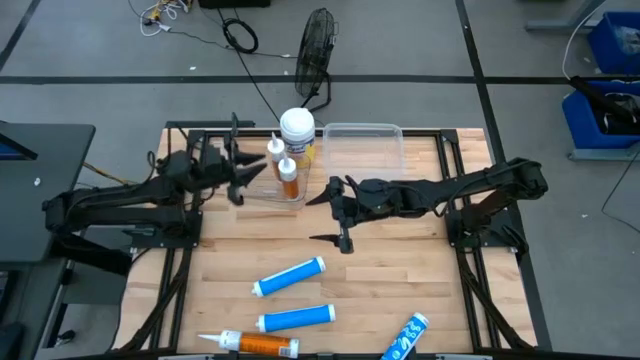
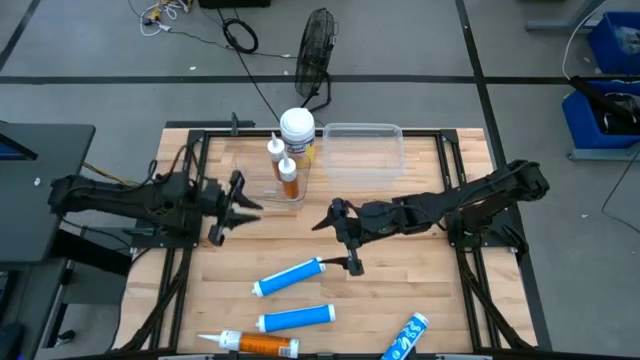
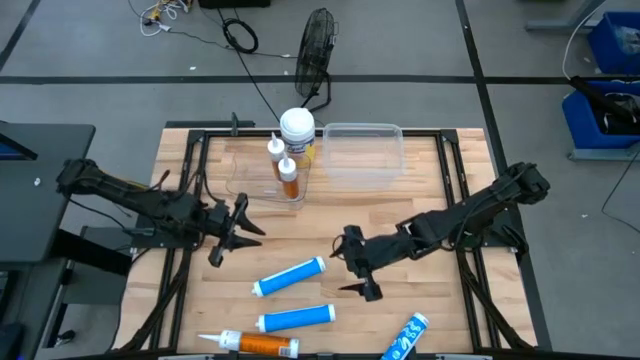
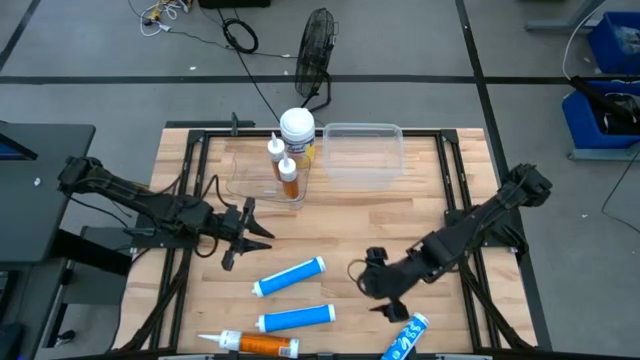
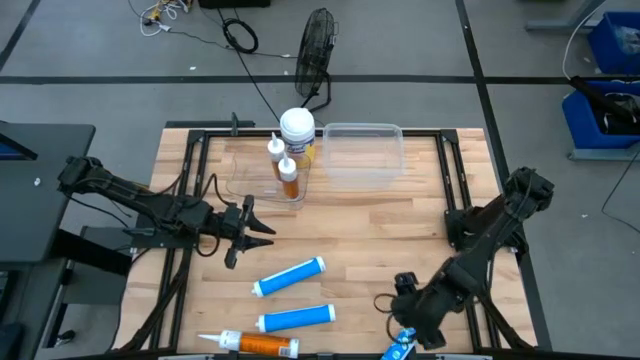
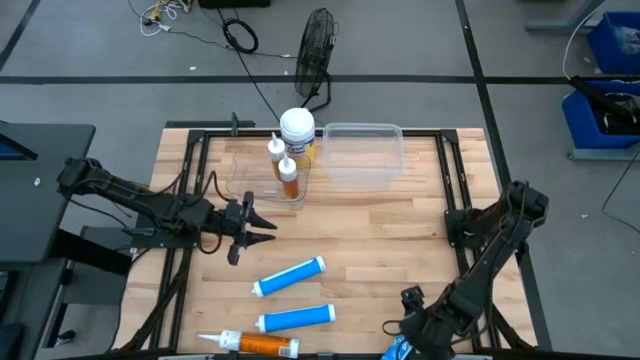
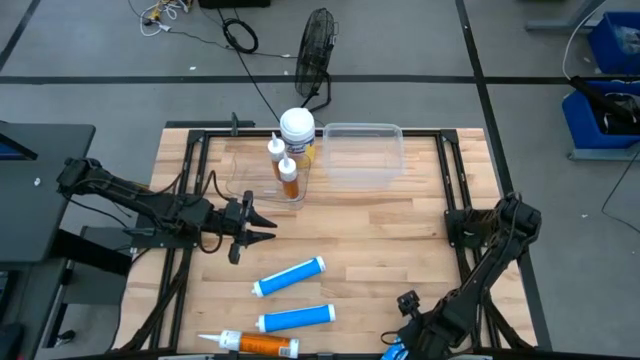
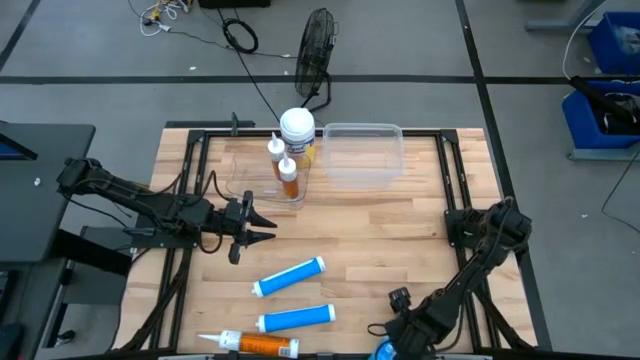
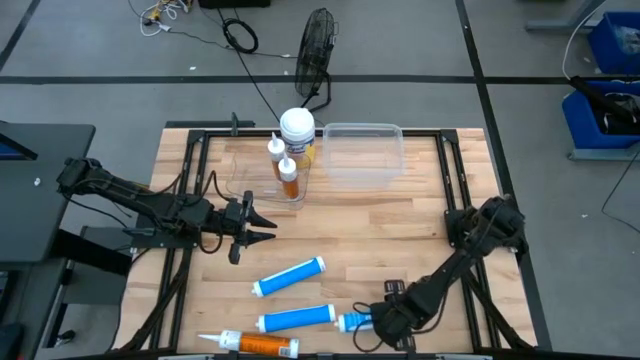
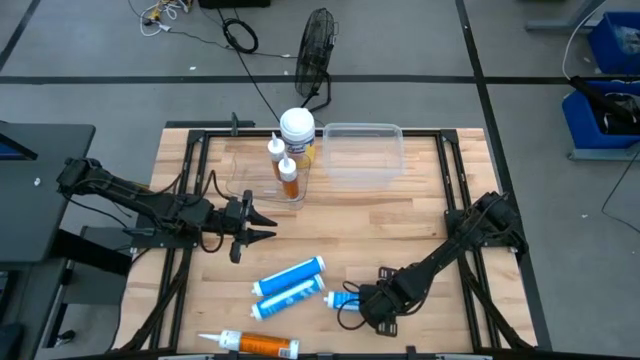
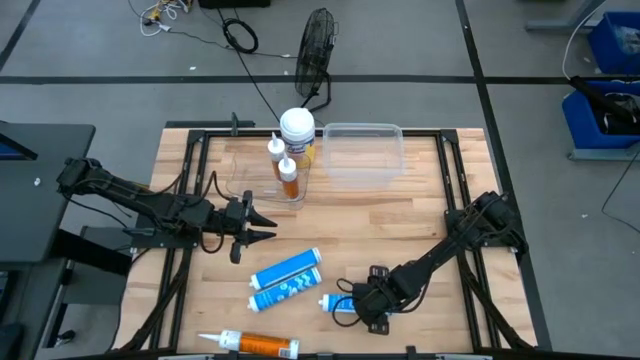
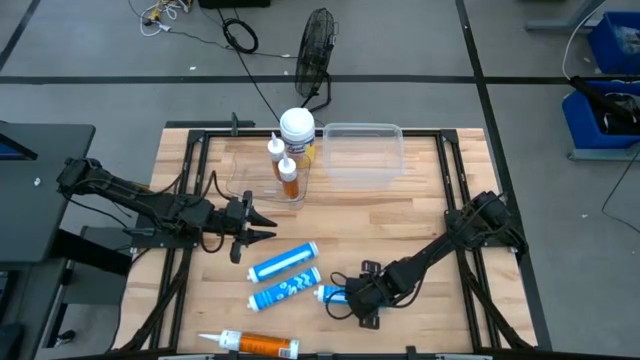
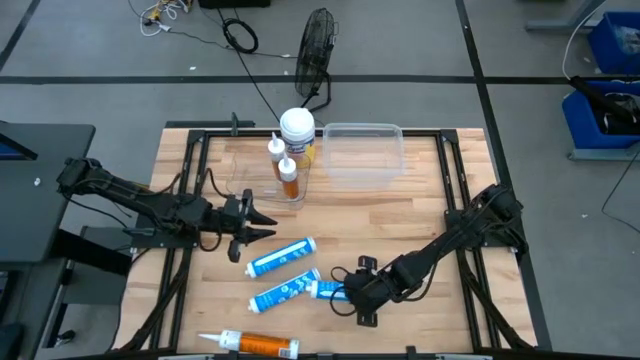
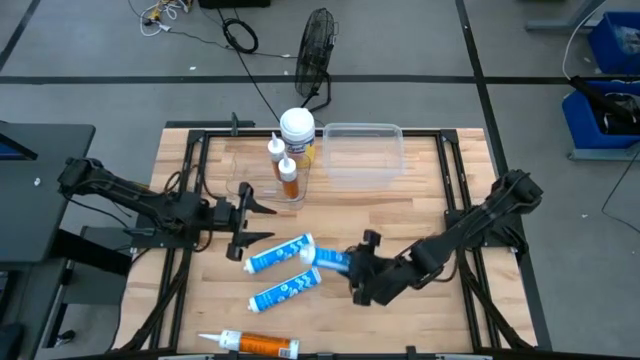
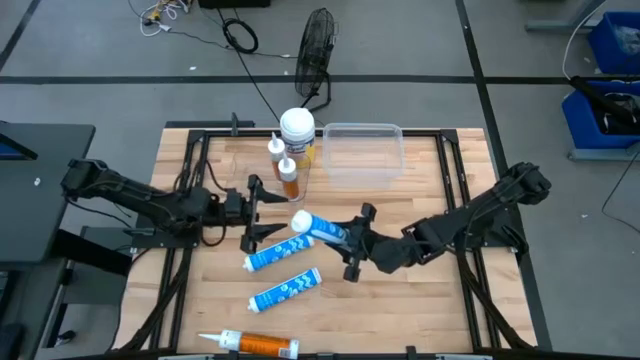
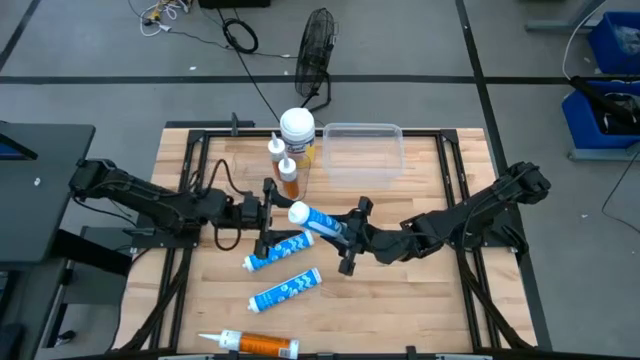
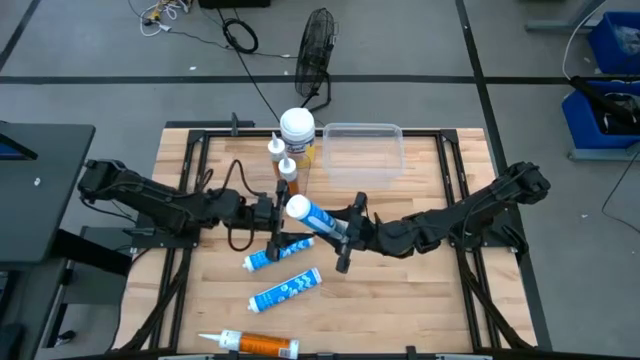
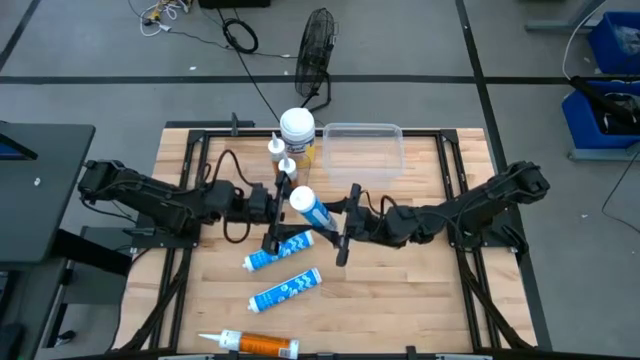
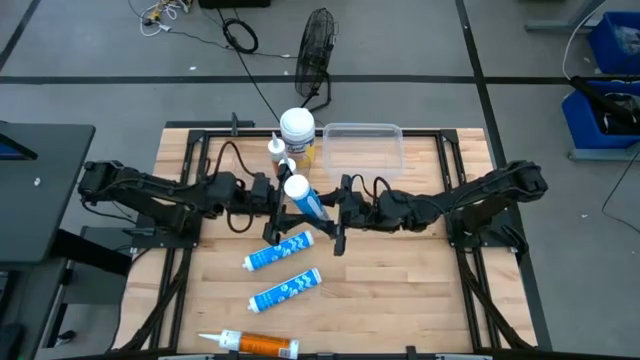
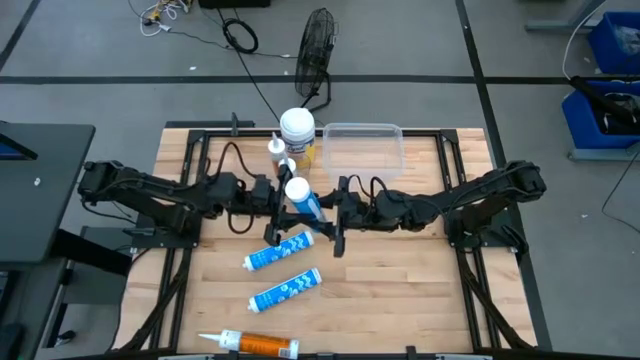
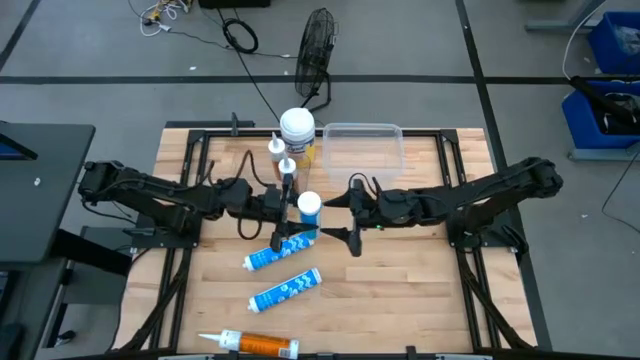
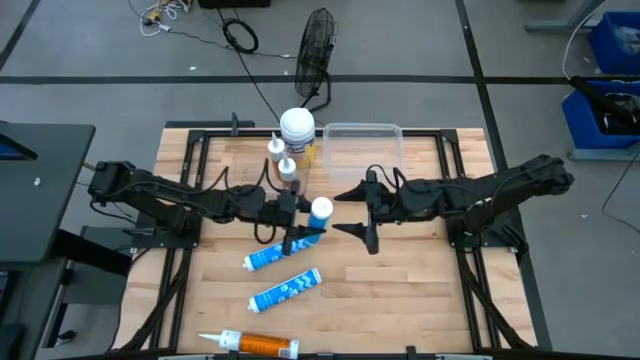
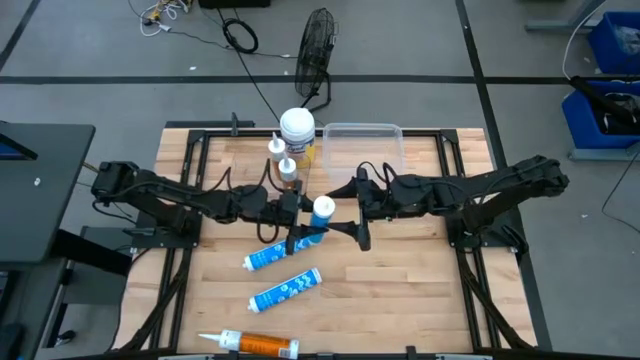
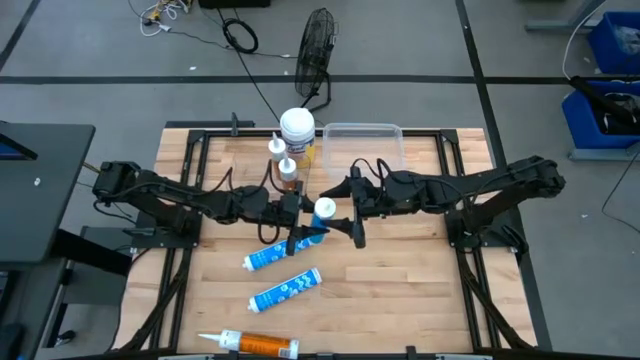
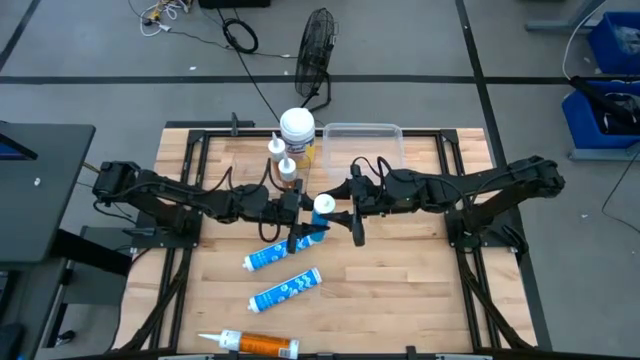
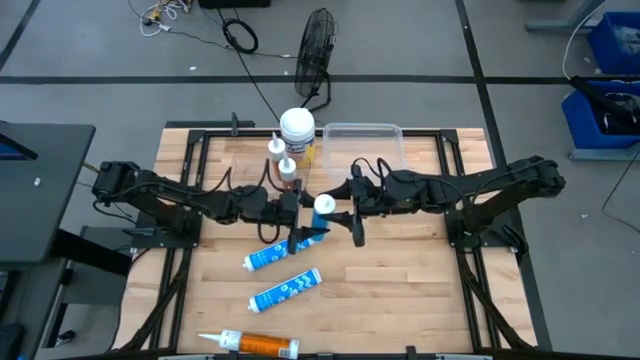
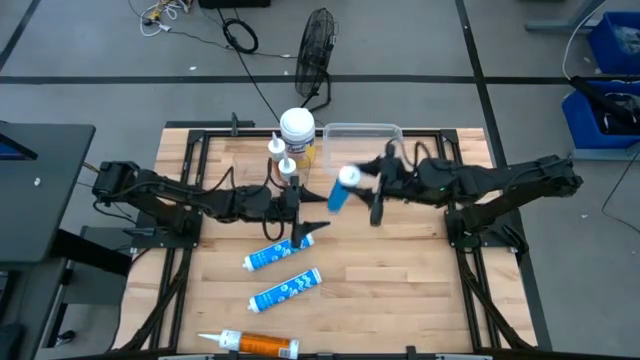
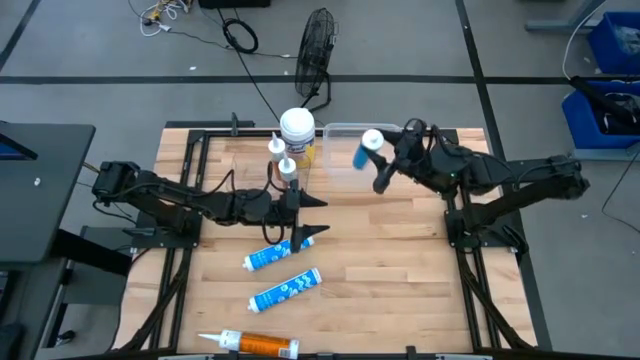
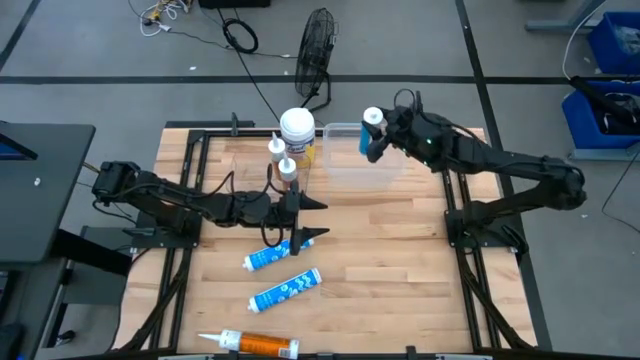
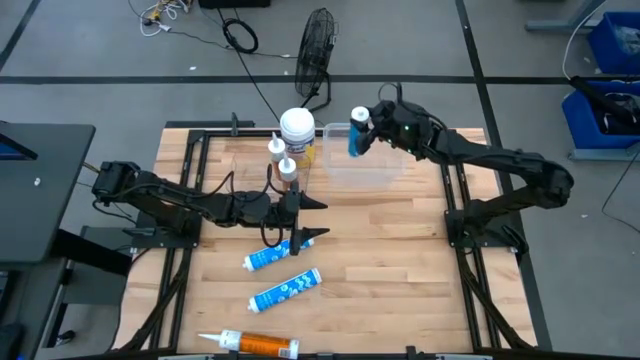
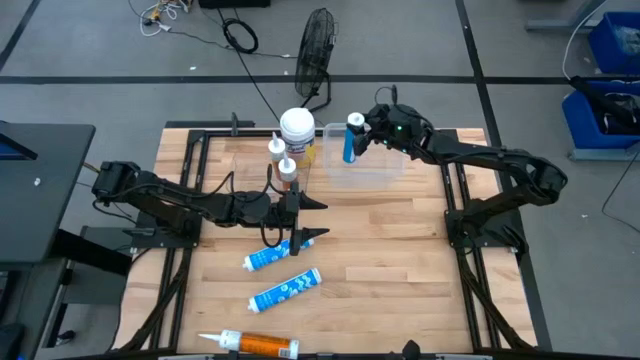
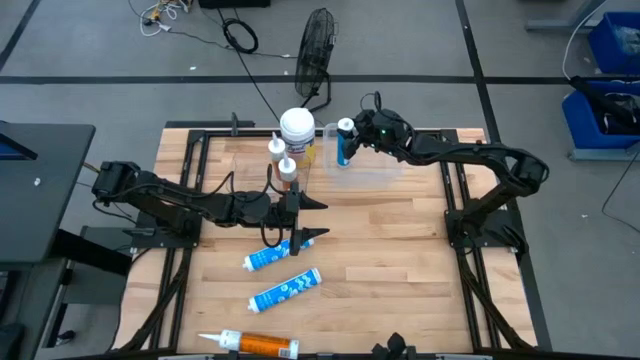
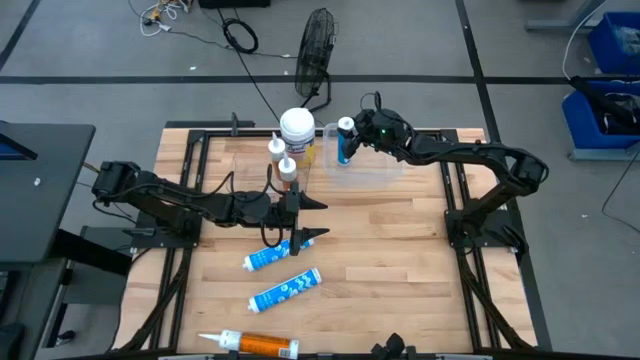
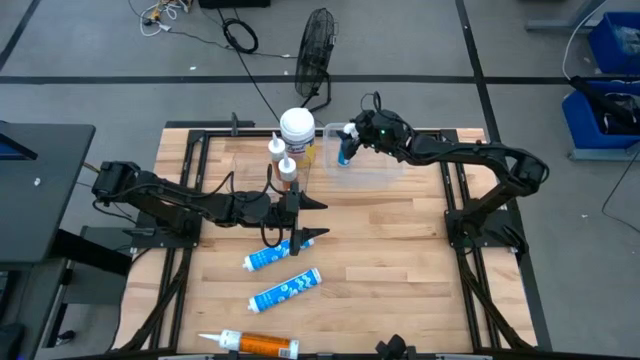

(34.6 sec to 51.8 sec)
Task: Pick & place silicon tubes, Sealant and Lysol wipes
Put the bottom blue sealant into the right transparent bin

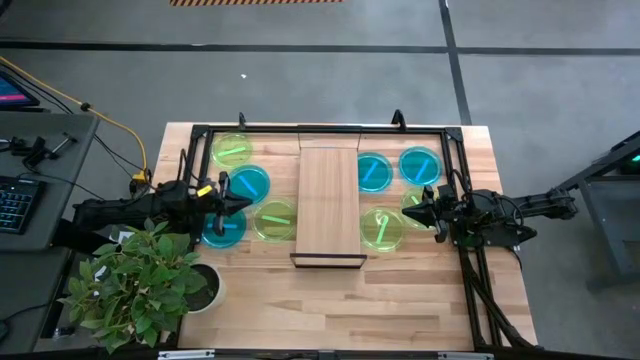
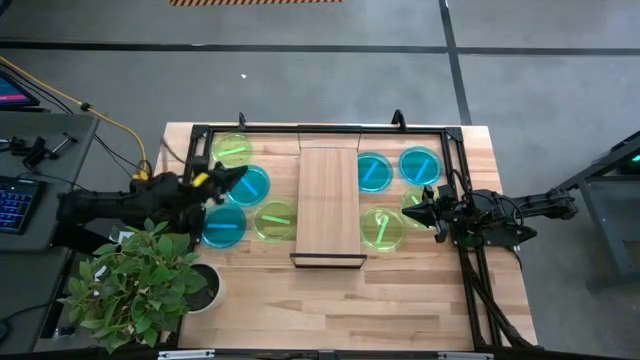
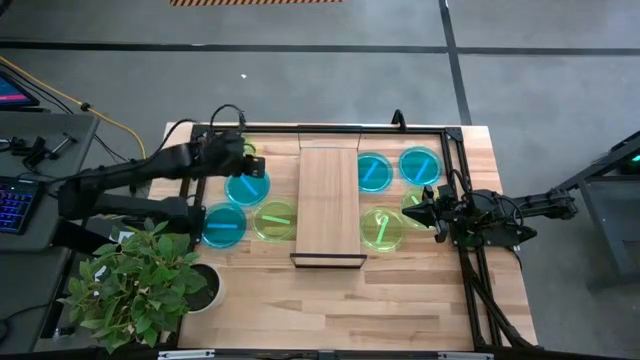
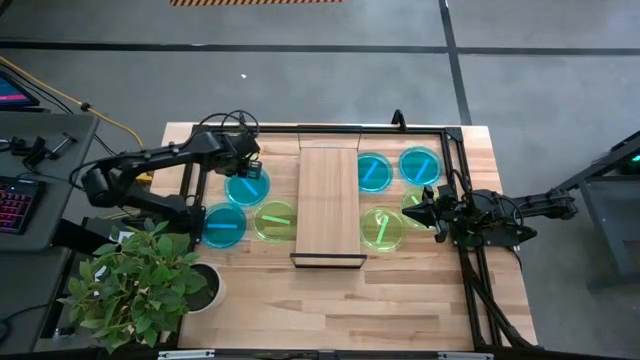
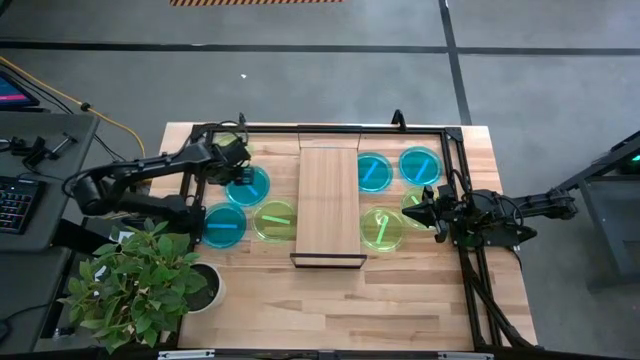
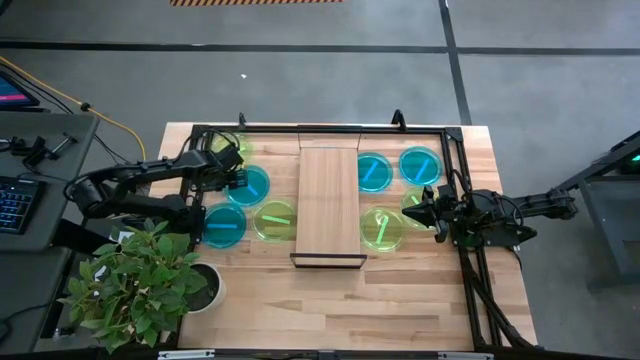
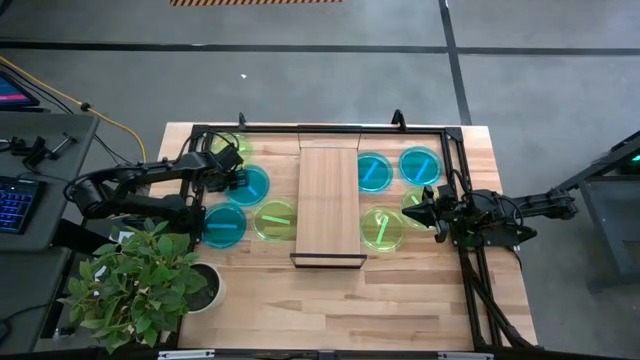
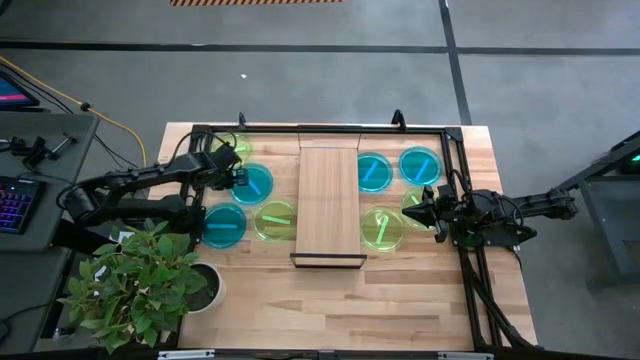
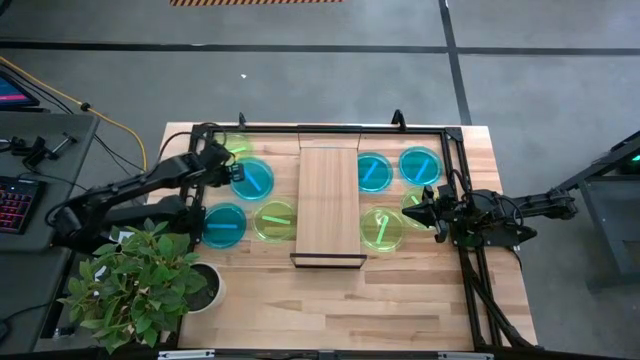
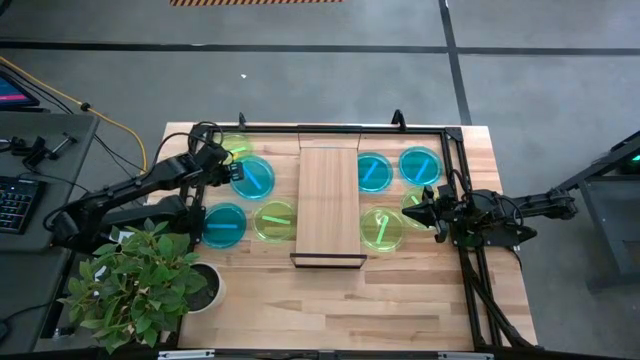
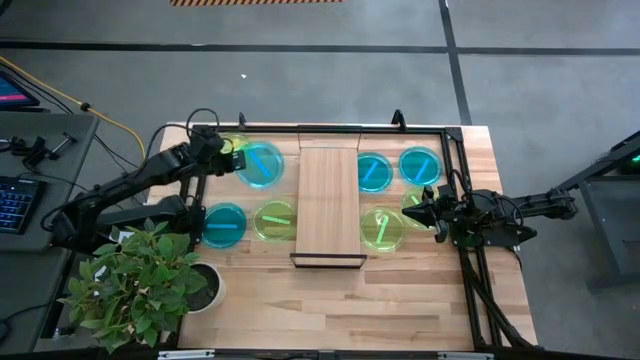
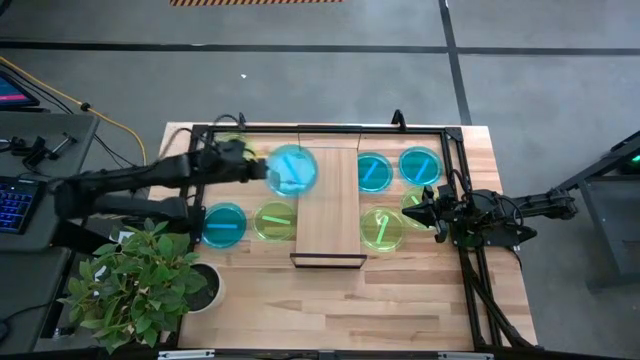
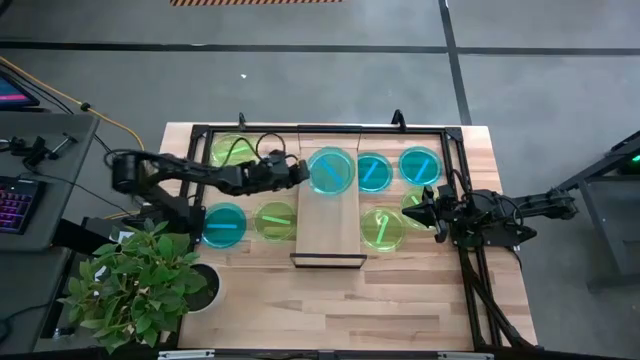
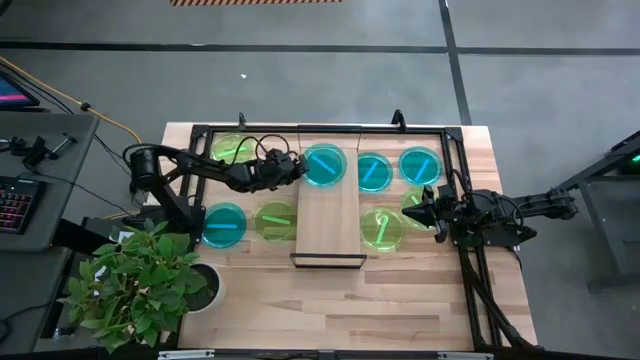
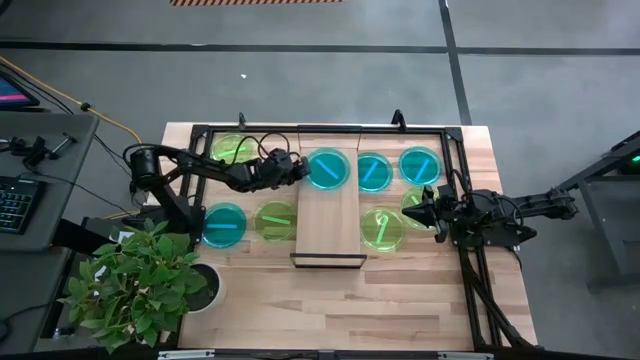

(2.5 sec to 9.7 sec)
Task: Place and stack plates onto a shelf
Put the blue plate on the shelf
